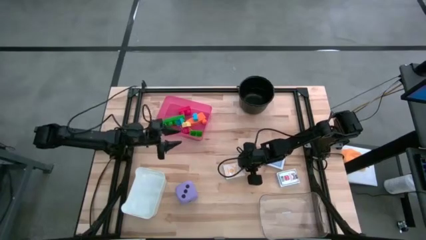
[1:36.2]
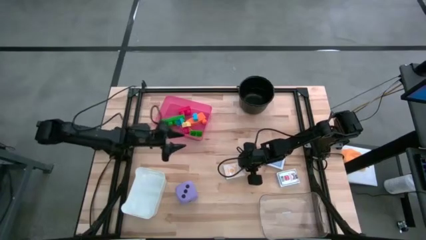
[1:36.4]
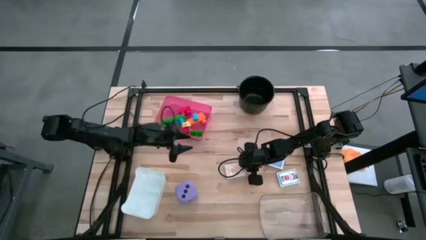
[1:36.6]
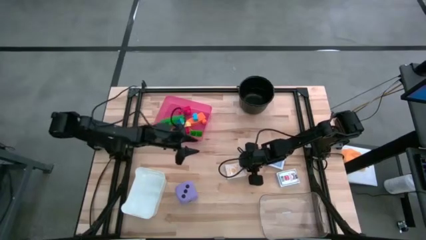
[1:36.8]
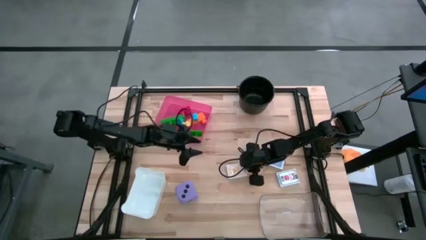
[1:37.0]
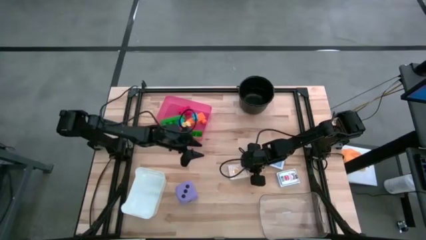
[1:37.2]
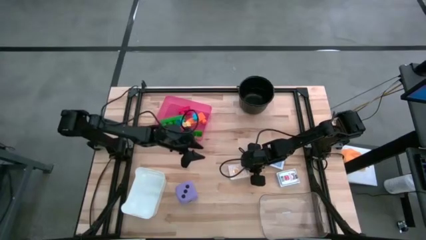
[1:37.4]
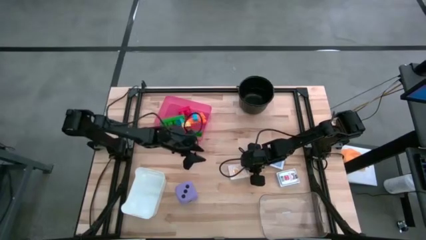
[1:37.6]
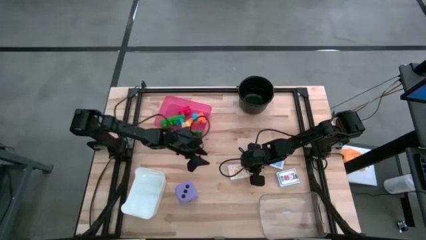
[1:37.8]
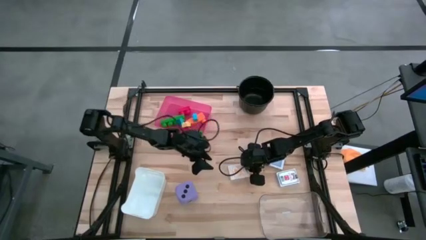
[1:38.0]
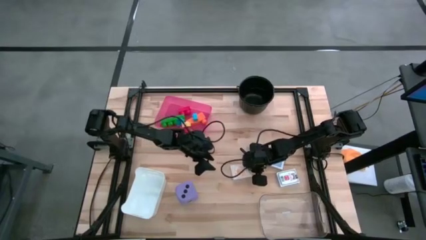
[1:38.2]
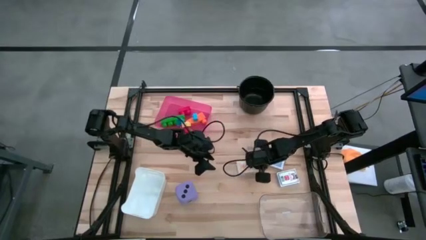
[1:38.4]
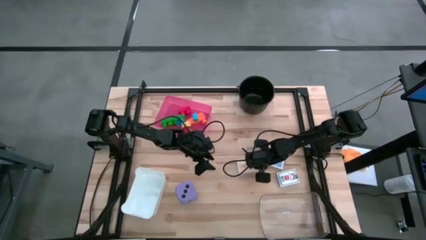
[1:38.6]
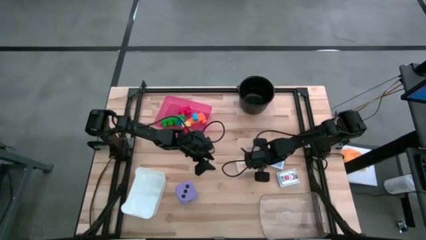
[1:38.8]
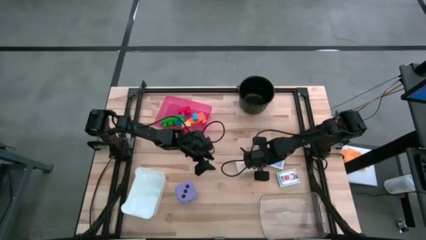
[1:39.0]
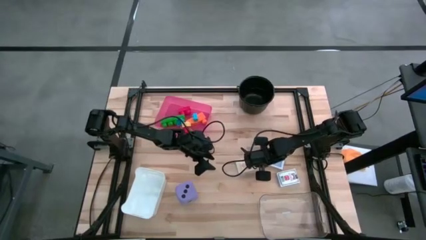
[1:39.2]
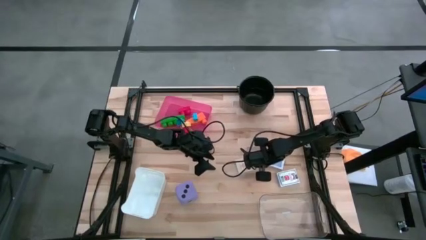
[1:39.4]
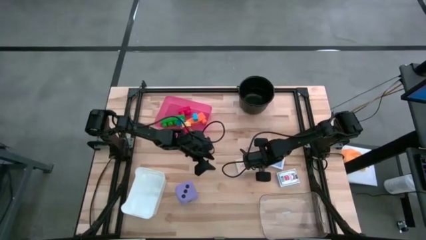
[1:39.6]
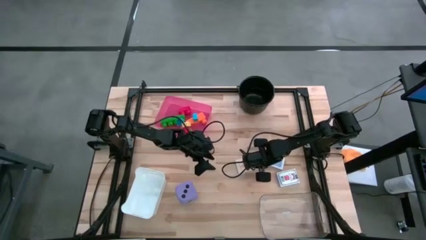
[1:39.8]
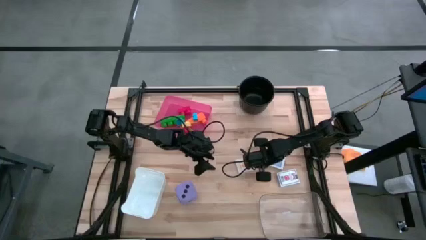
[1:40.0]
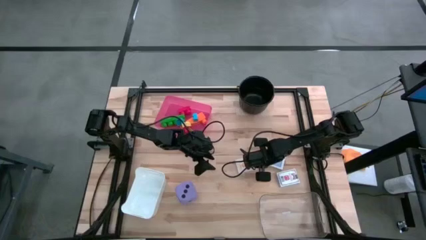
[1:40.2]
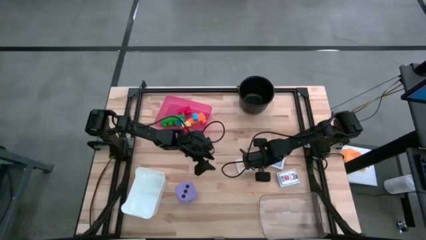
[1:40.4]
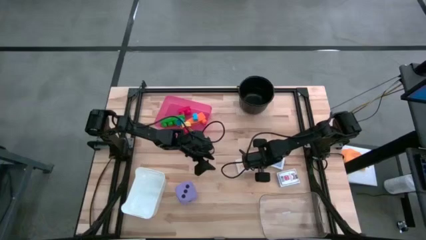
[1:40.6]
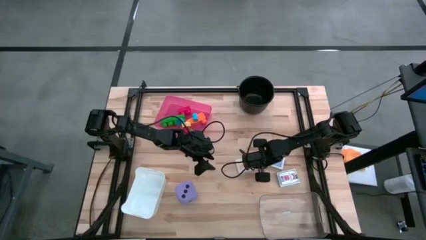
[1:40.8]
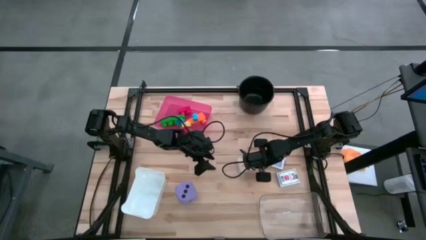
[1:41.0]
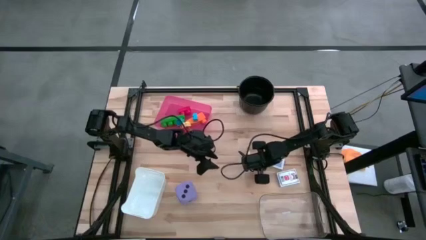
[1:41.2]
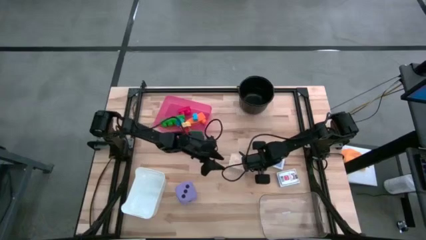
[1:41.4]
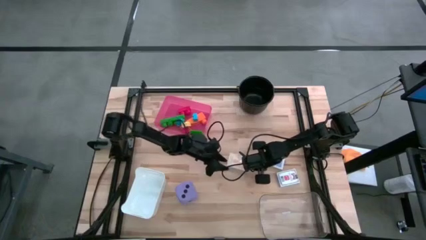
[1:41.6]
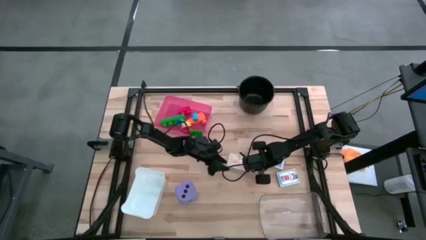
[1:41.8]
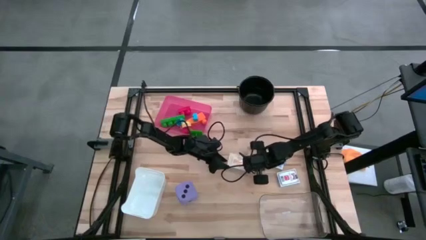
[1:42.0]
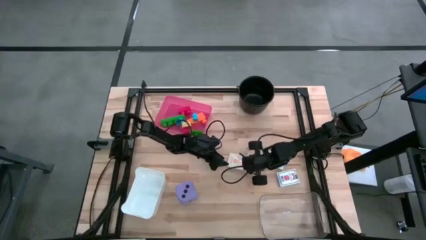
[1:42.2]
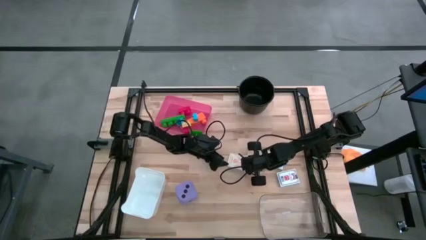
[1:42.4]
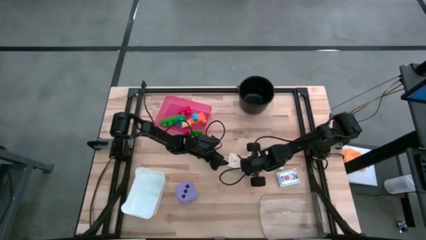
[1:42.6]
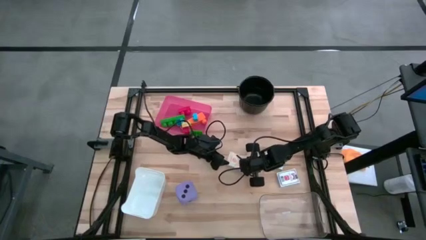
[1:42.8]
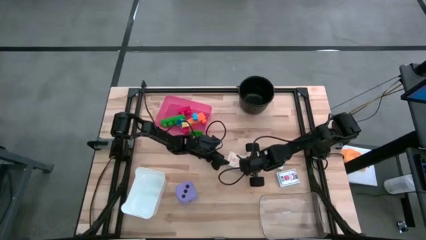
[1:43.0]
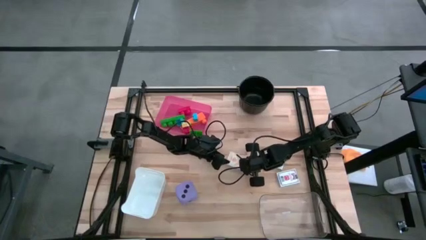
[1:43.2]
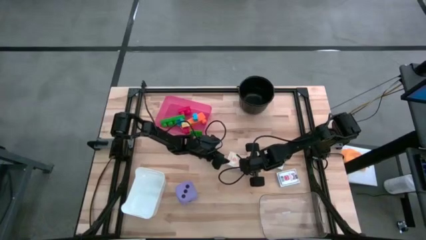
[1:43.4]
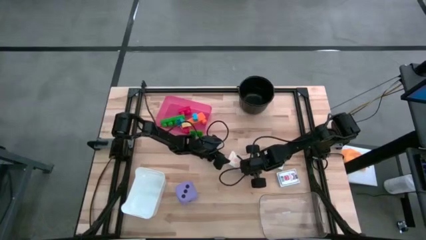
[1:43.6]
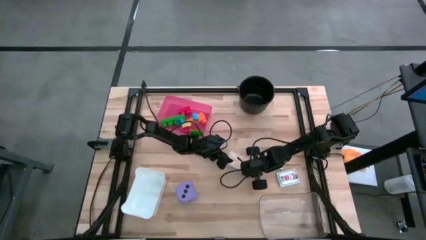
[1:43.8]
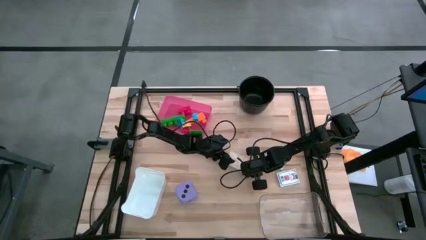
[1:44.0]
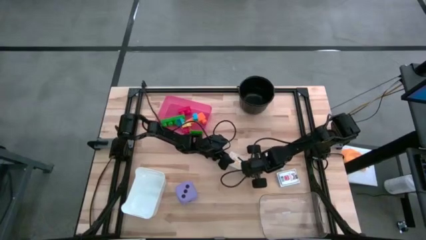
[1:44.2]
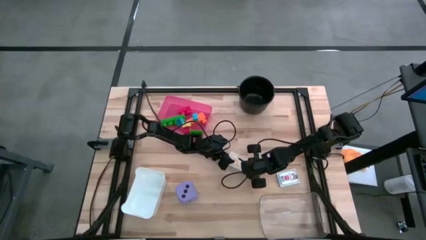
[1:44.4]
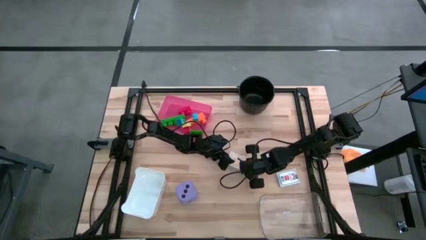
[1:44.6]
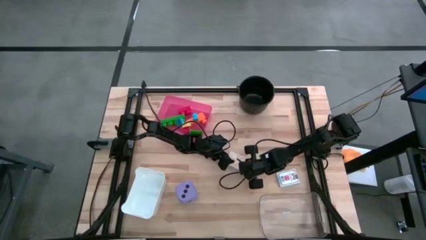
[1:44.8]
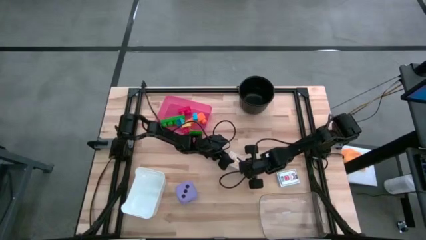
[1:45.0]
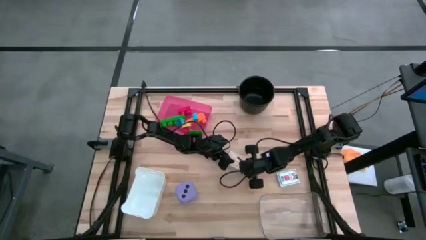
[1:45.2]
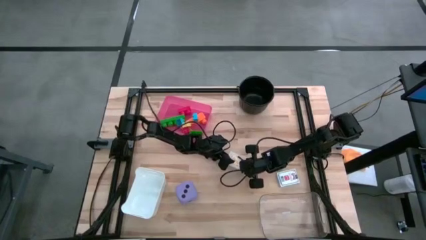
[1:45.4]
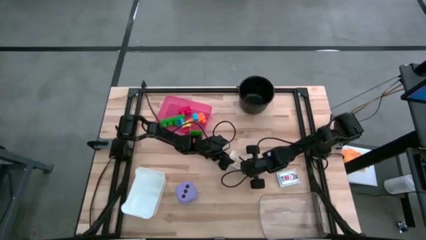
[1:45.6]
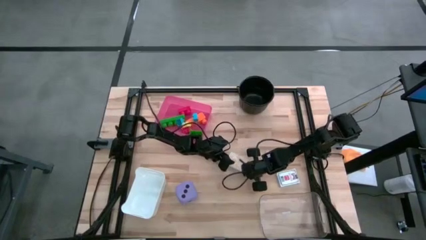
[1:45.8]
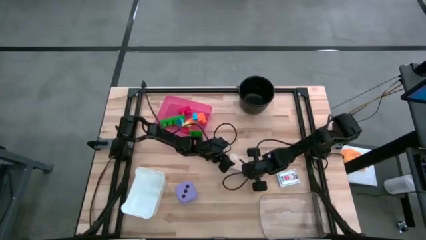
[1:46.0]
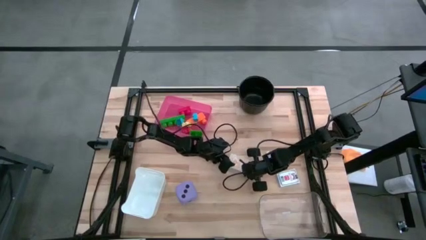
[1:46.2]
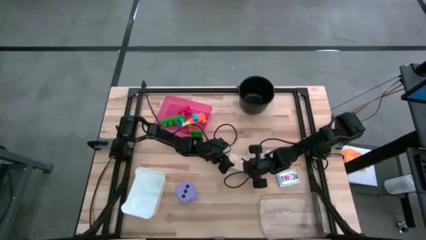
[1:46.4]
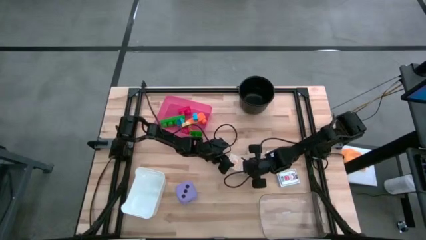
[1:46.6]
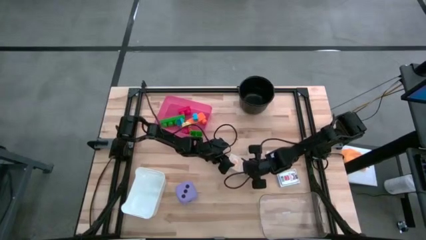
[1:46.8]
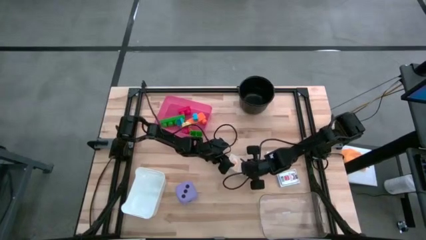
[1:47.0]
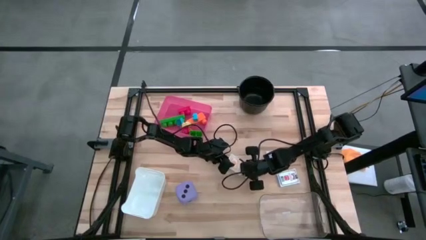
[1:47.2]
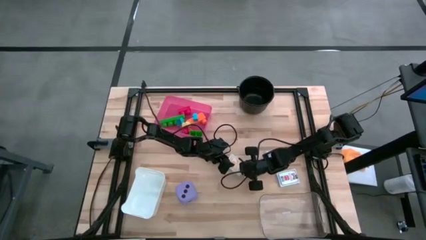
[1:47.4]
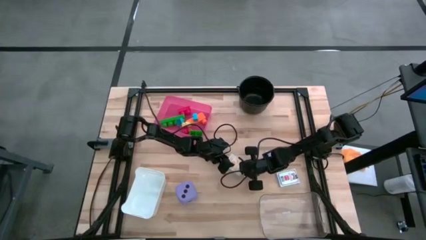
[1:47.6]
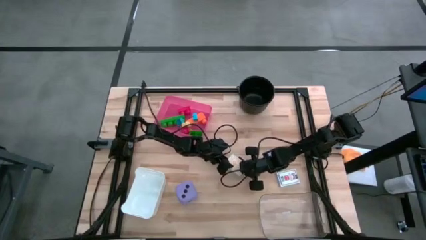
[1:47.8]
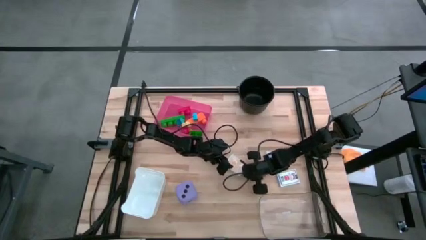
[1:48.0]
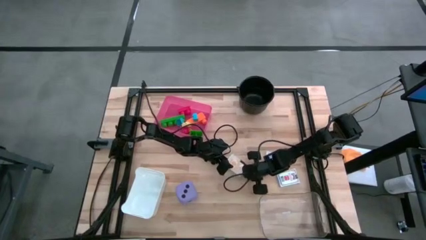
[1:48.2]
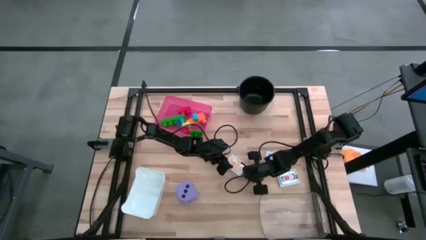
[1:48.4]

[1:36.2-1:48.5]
Task: Pick & Place Toys
Put the yellow deck of cards into the transparent bin
